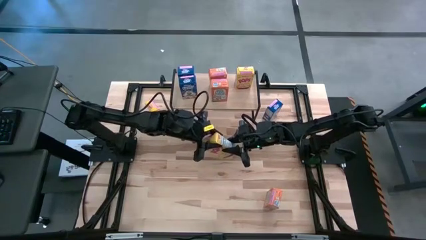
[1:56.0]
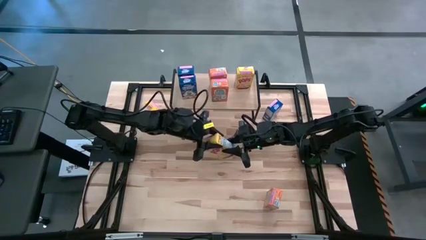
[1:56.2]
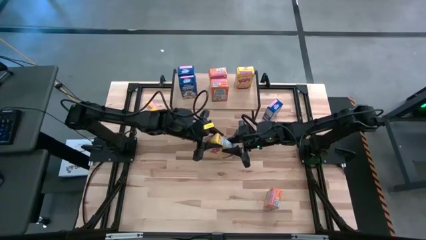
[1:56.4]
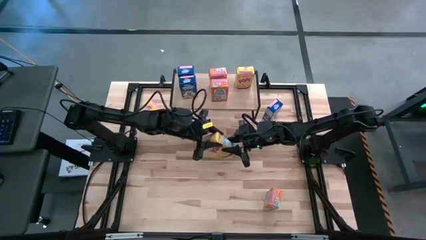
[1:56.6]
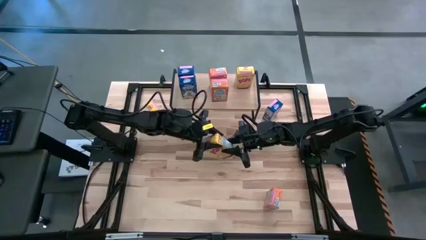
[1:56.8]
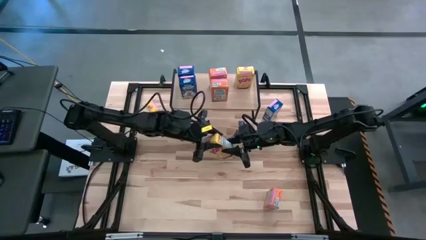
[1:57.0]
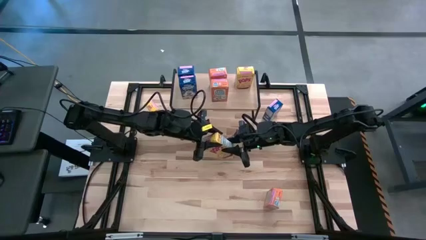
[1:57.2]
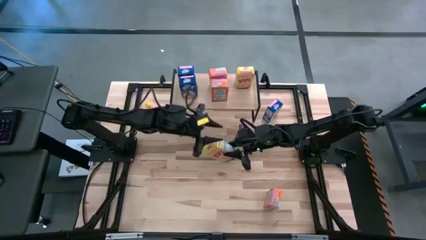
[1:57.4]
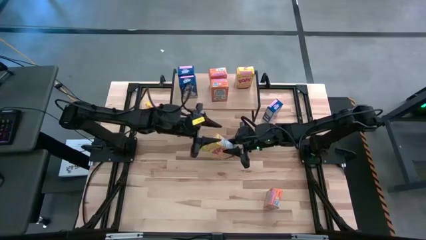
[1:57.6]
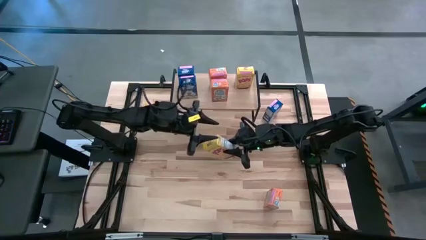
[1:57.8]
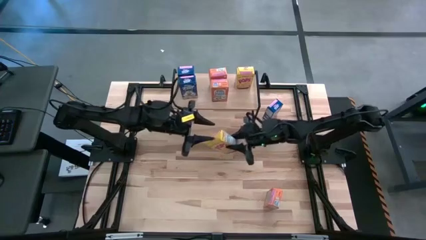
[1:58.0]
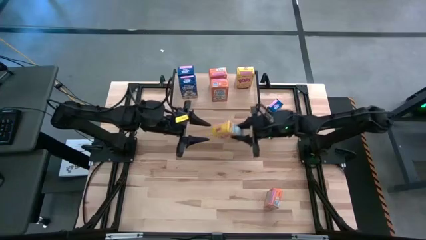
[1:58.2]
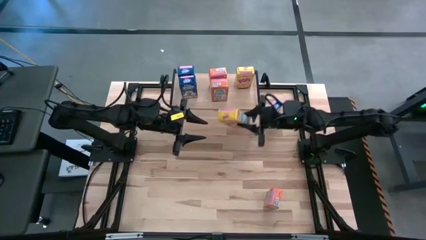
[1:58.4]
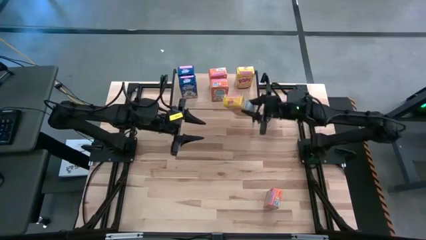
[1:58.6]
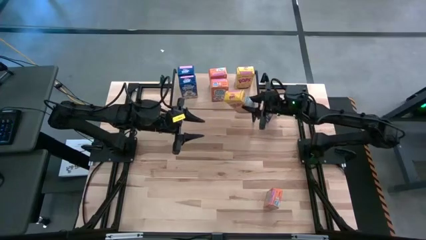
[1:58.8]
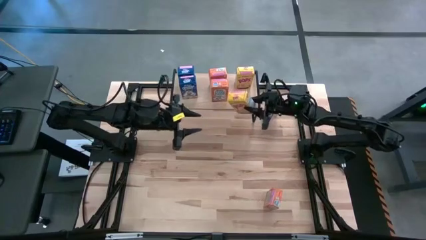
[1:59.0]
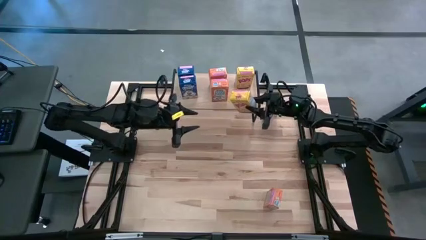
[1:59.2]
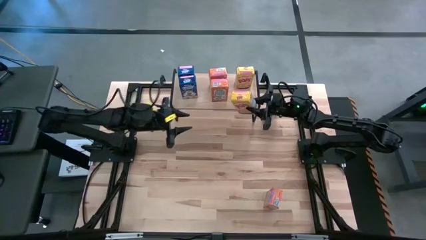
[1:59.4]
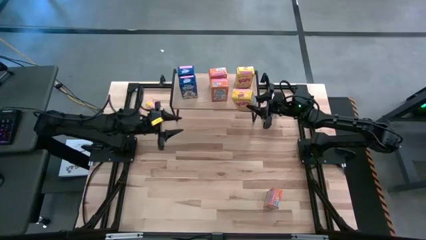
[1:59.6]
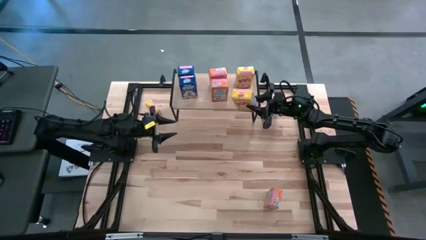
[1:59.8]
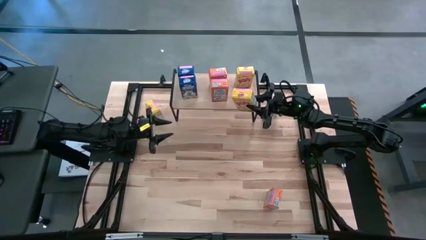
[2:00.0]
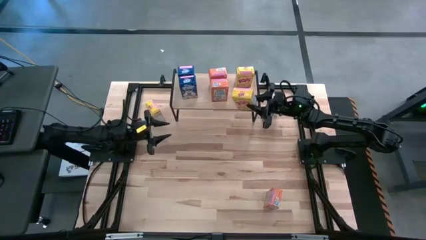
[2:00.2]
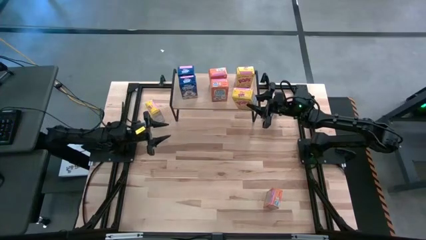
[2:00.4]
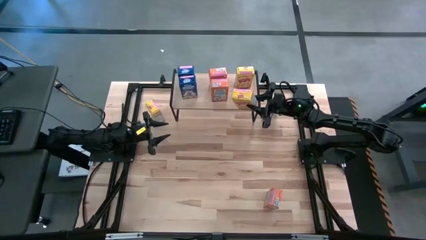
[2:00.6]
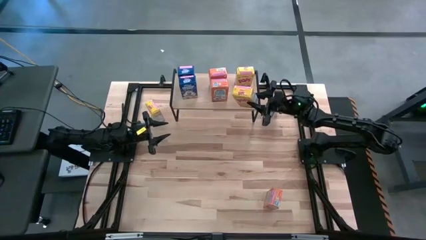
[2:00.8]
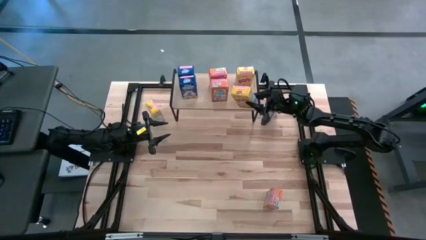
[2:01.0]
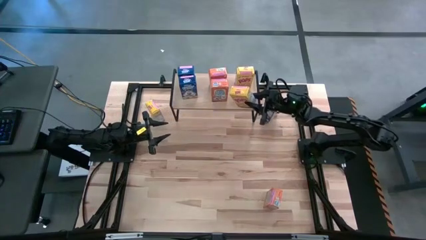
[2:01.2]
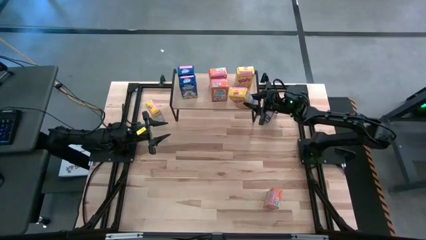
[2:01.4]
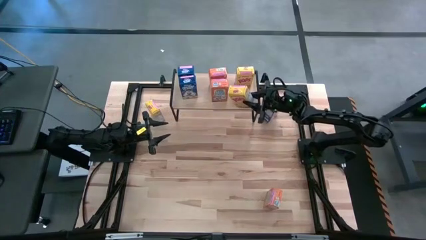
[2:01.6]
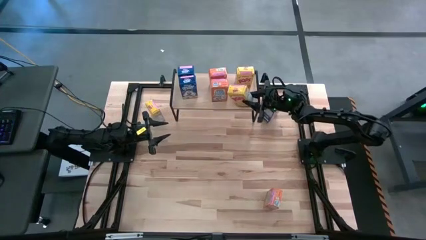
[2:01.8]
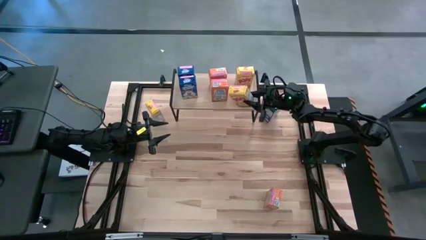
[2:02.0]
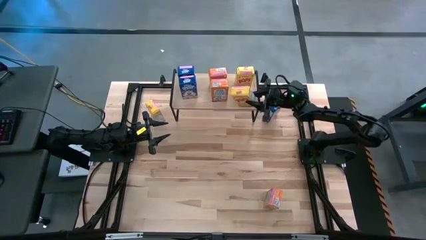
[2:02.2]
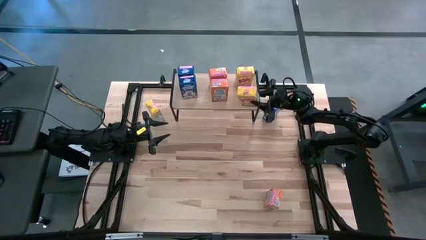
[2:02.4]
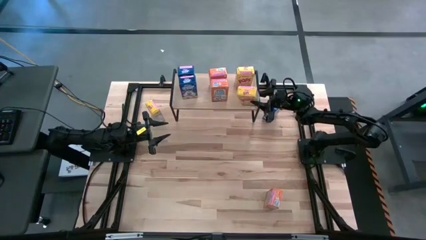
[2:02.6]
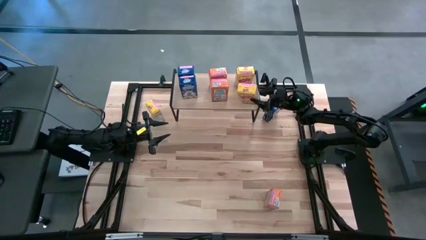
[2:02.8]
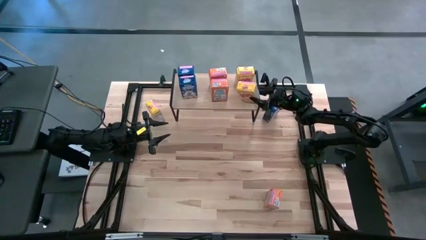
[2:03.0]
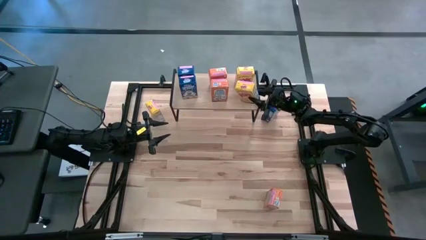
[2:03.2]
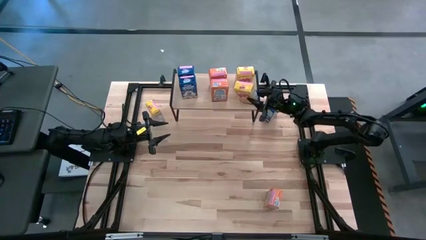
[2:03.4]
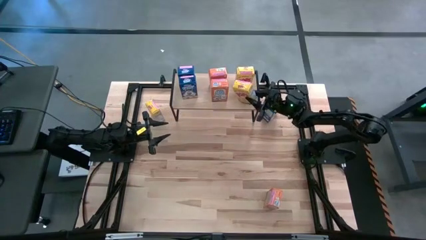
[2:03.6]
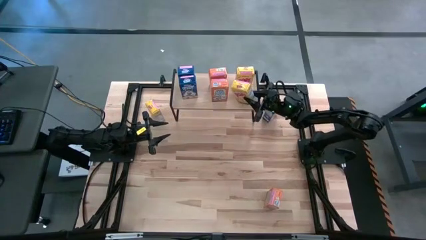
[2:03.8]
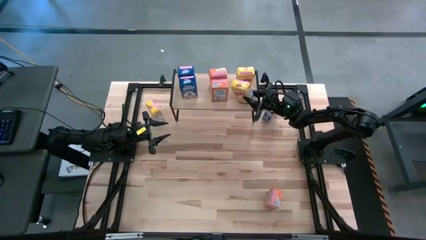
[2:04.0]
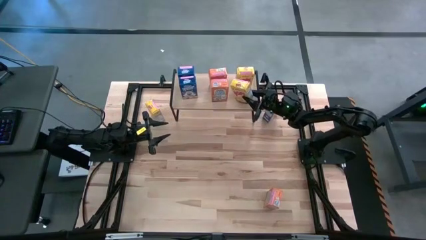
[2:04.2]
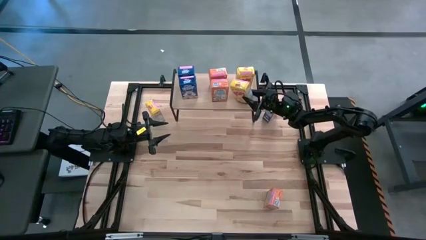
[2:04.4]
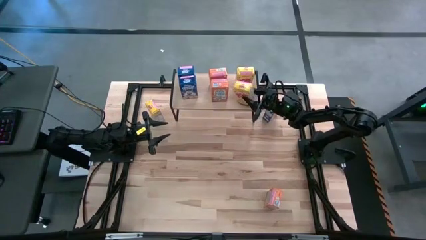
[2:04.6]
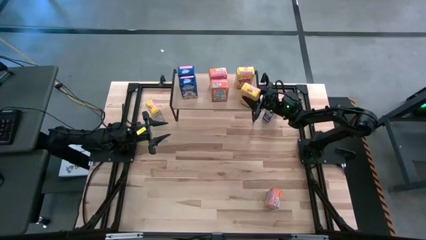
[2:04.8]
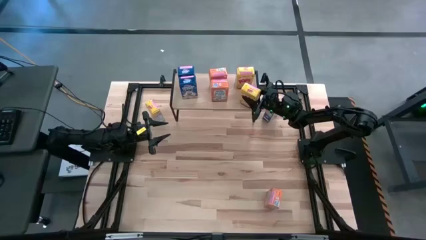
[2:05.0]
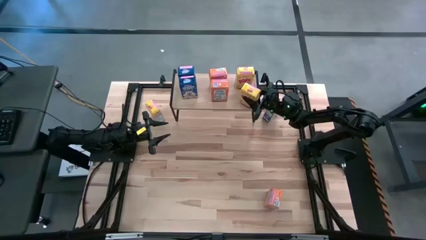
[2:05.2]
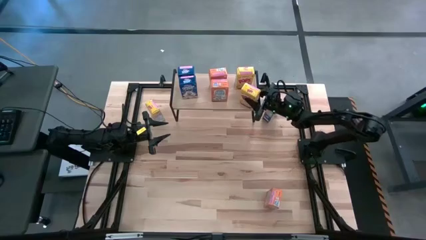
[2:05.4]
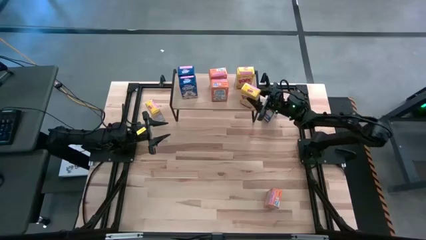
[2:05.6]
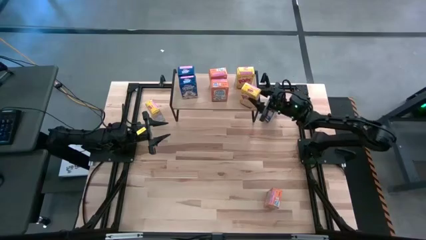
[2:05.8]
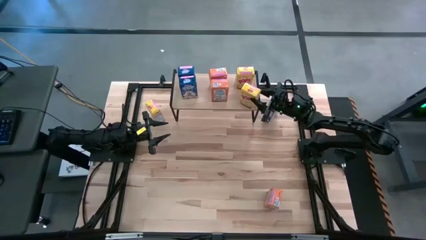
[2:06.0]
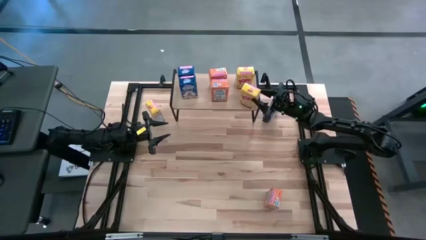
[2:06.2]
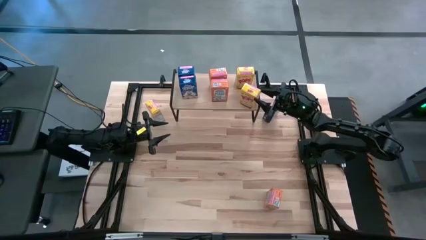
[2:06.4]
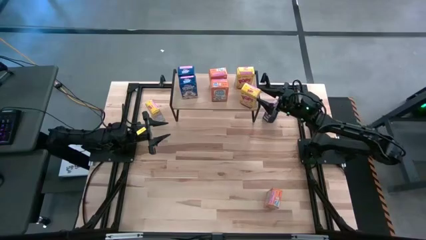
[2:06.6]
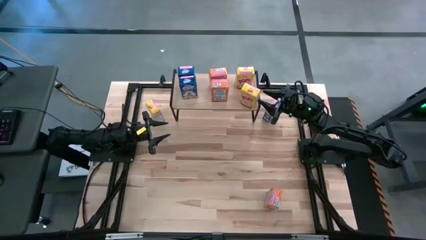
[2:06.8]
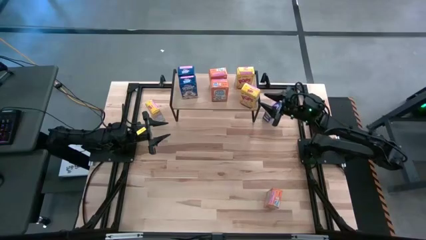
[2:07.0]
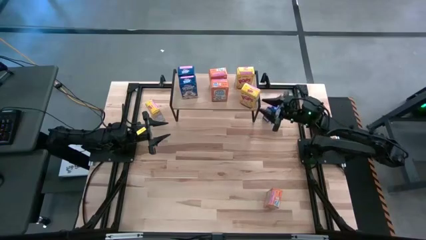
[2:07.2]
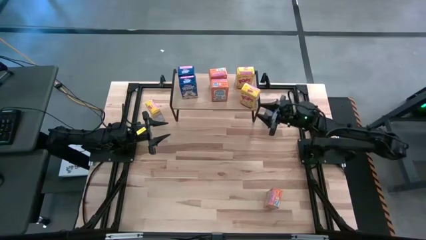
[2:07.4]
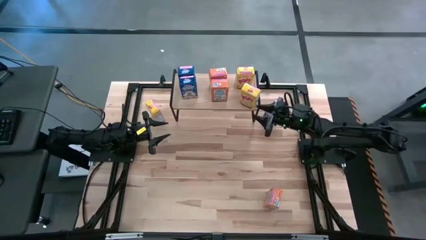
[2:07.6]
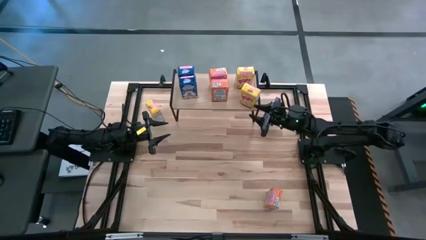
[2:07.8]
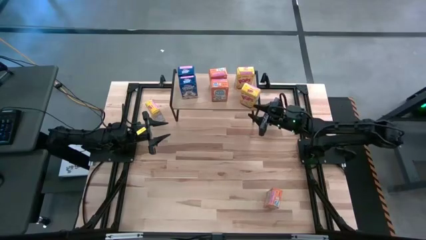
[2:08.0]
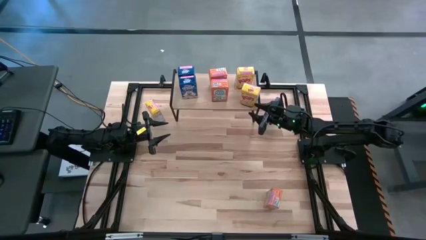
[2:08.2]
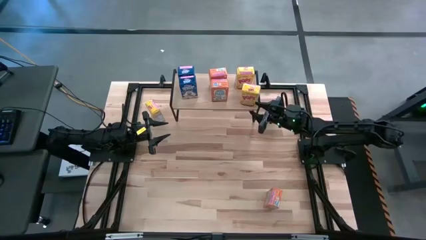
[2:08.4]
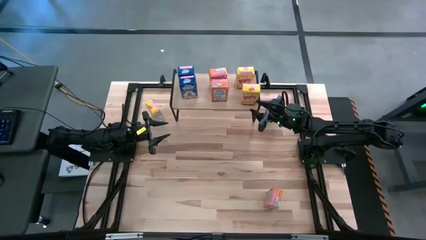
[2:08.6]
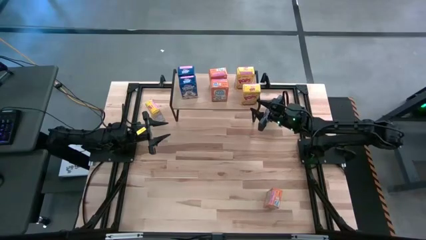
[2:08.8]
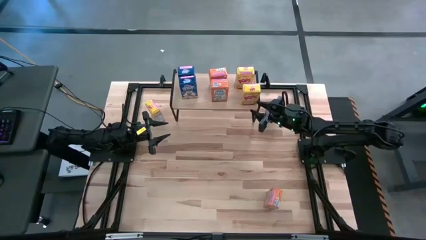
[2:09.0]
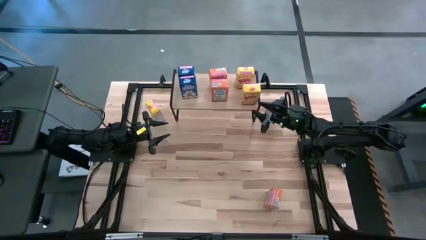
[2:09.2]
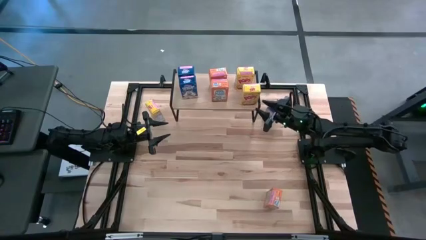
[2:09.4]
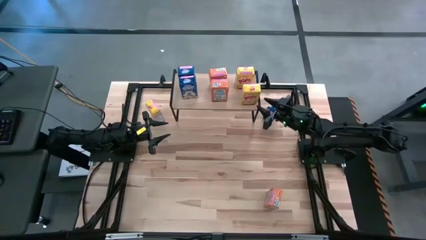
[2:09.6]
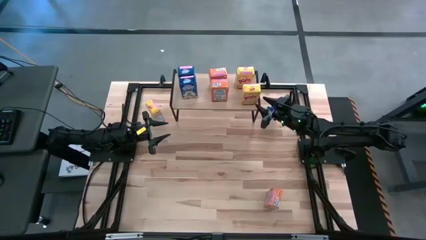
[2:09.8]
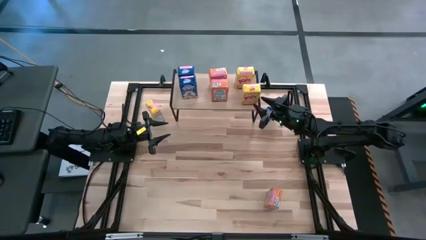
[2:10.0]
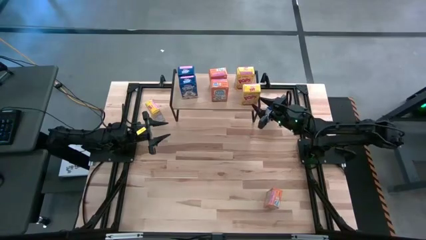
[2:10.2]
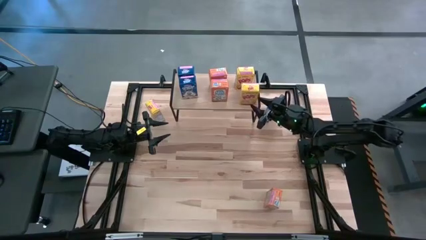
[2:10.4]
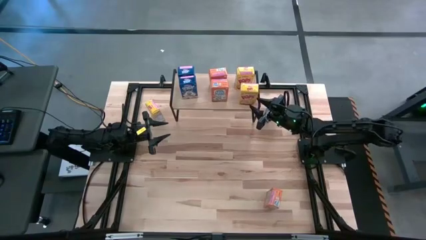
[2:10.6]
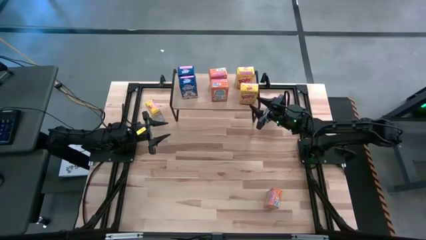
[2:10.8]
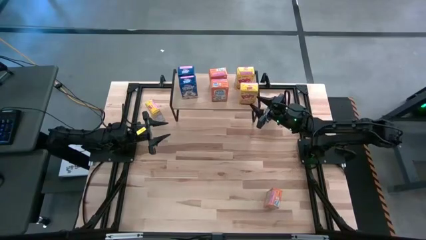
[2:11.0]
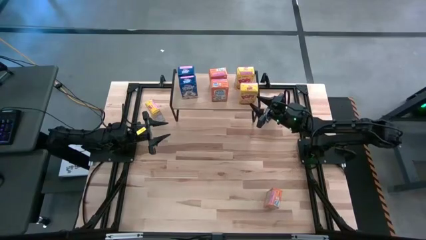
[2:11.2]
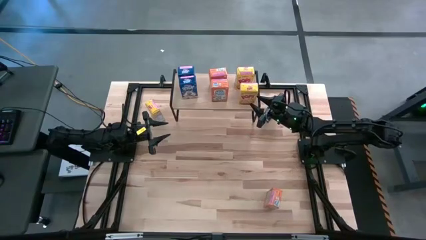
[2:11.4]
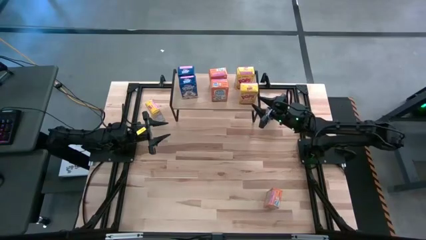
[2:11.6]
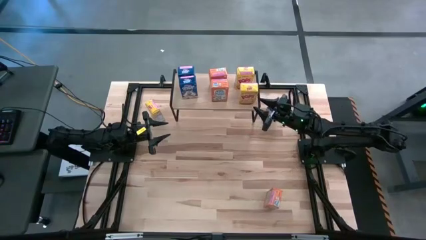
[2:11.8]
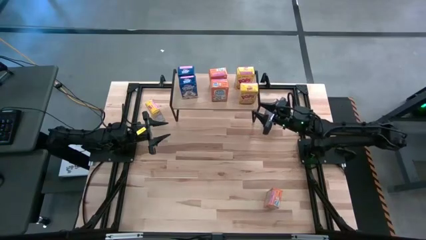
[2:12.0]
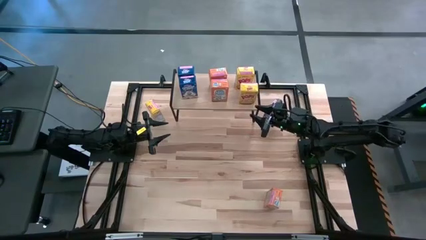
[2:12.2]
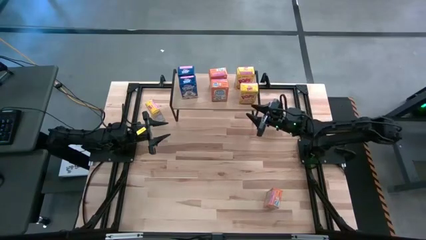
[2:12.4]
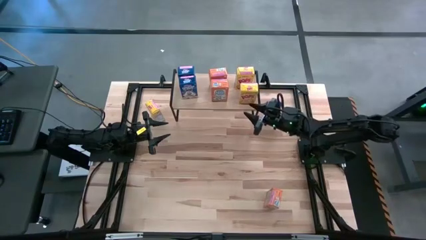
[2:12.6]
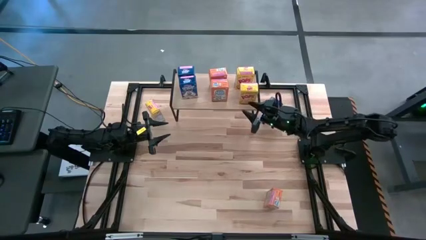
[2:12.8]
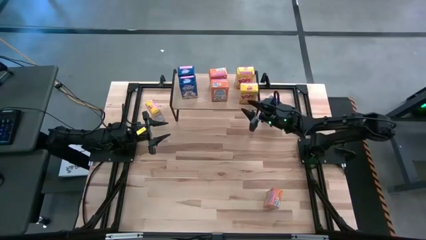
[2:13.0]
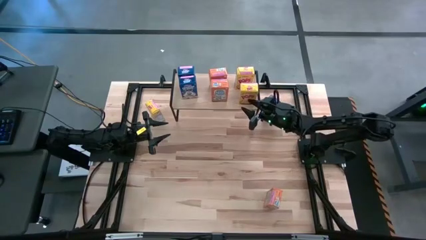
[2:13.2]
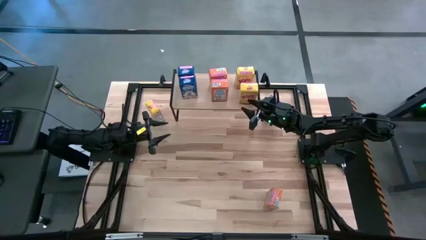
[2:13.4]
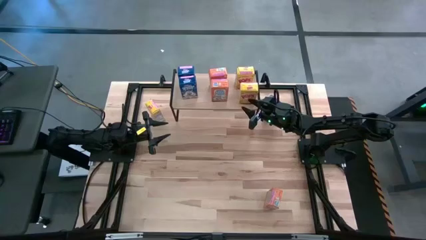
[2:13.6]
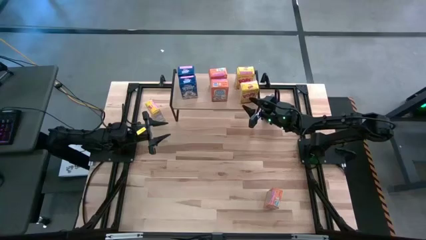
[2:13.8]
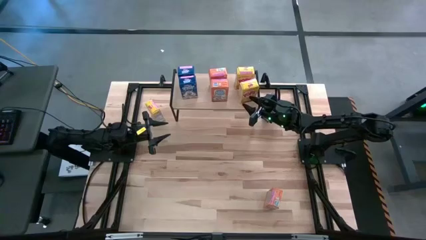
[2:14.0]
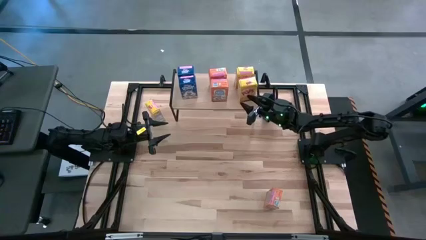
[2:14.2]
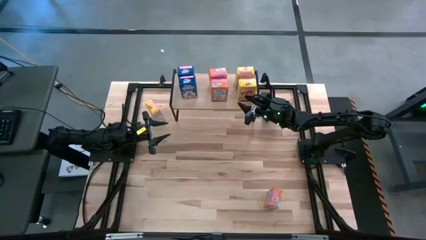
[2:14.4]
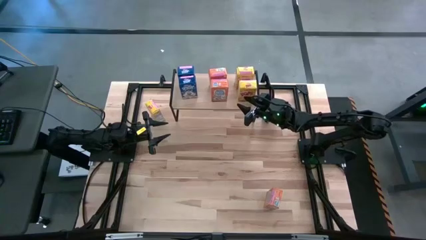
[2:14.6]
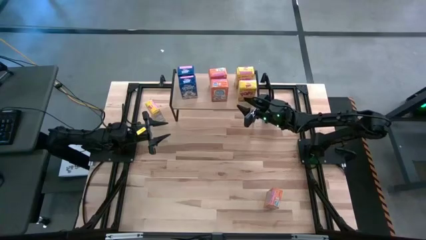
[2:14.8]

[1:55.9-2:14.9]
Task: Stack cereal on shelf
Put the bottom yellow cereal box aligned with the other yellow cereal box on the shelf
